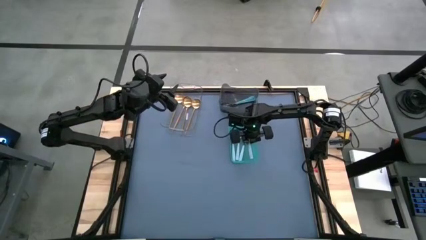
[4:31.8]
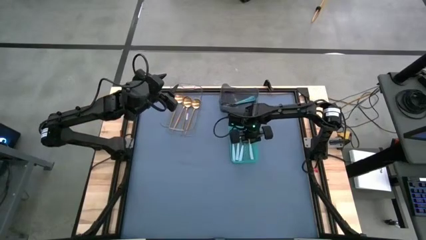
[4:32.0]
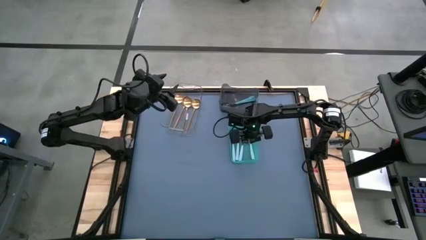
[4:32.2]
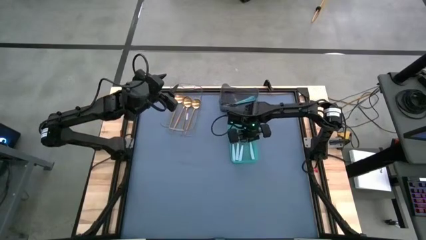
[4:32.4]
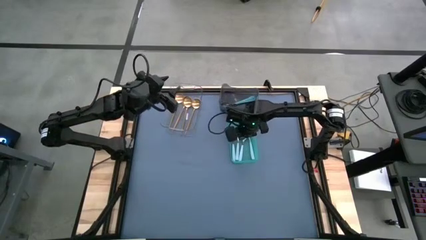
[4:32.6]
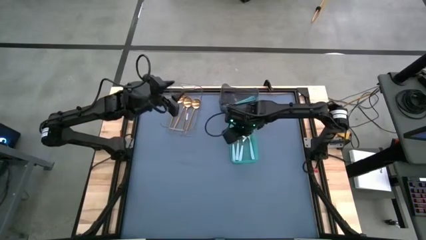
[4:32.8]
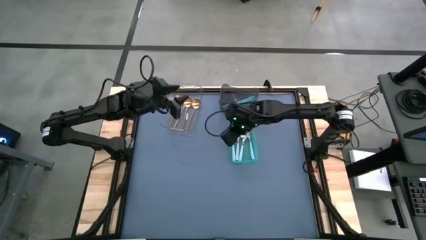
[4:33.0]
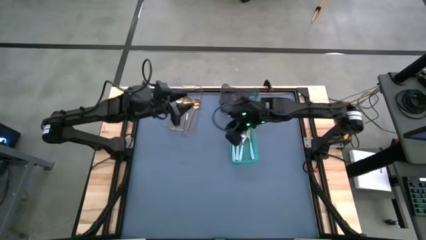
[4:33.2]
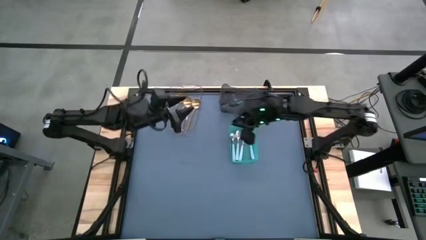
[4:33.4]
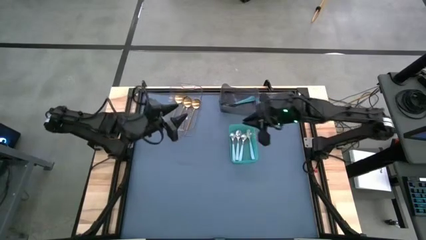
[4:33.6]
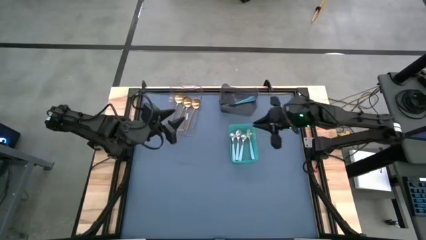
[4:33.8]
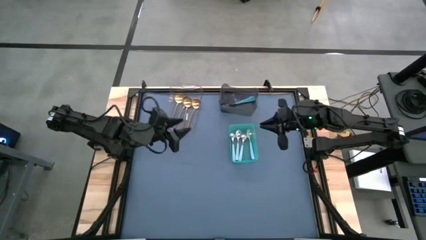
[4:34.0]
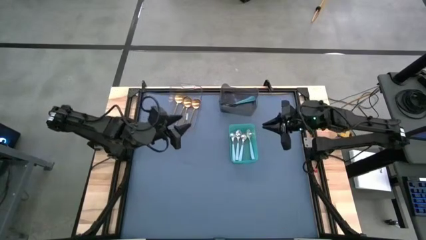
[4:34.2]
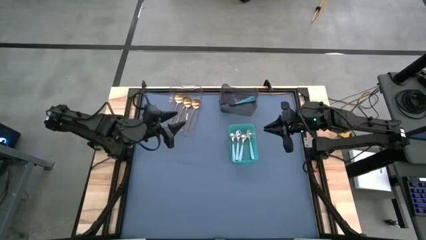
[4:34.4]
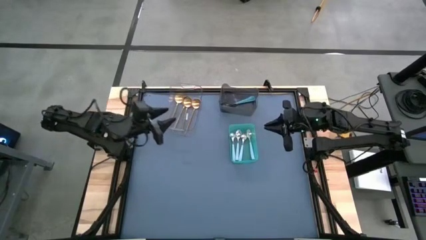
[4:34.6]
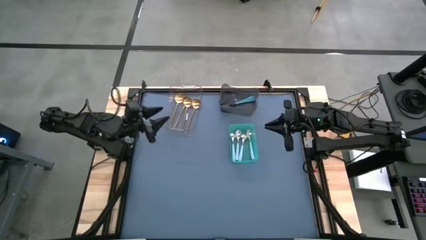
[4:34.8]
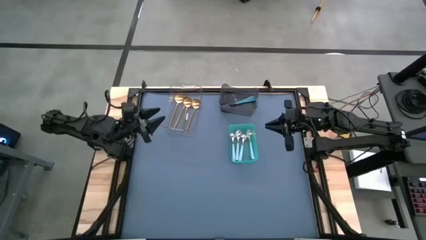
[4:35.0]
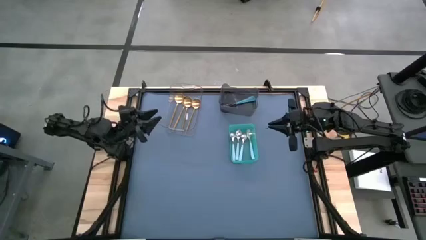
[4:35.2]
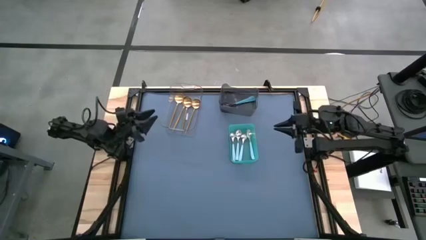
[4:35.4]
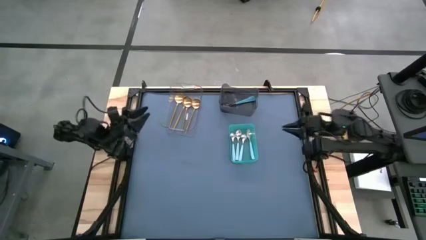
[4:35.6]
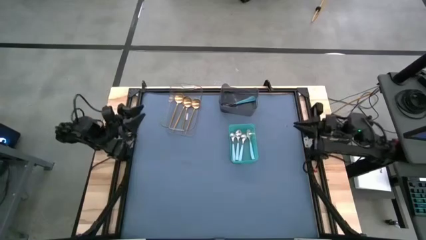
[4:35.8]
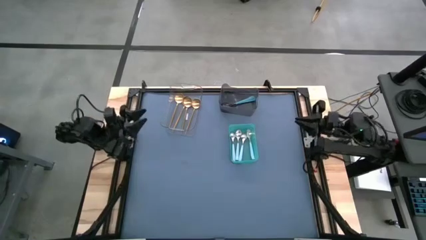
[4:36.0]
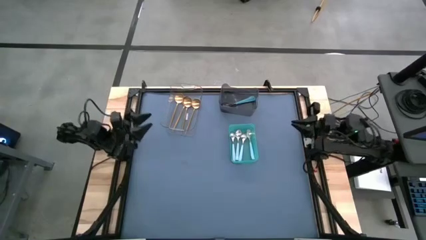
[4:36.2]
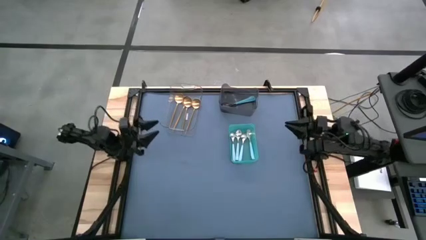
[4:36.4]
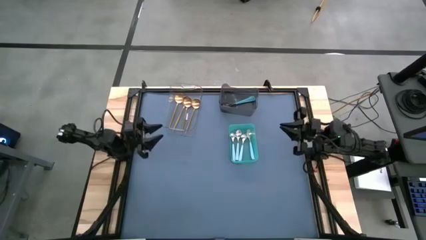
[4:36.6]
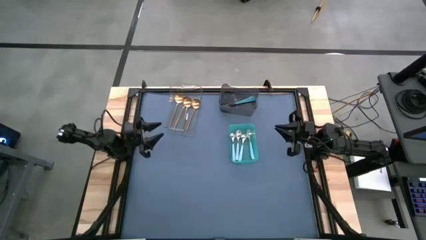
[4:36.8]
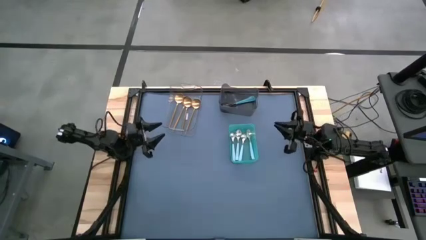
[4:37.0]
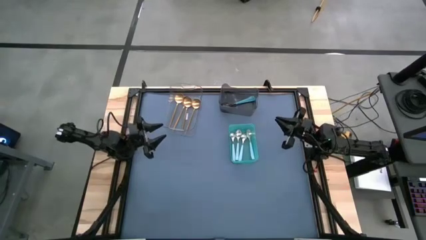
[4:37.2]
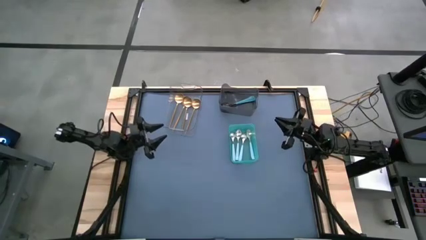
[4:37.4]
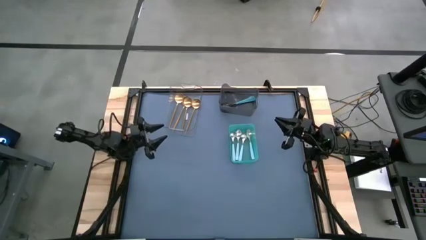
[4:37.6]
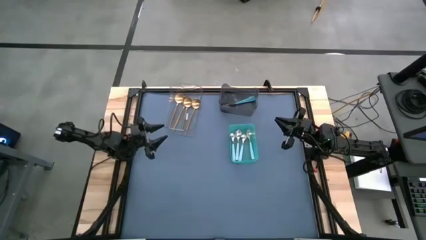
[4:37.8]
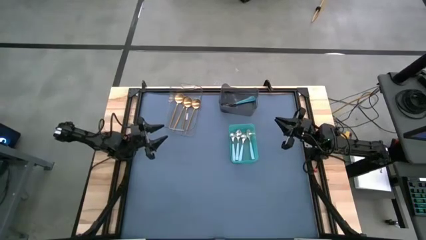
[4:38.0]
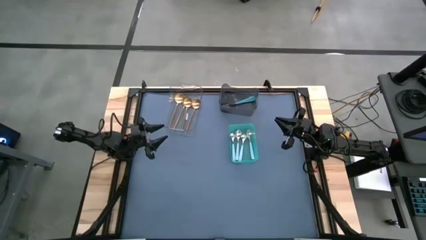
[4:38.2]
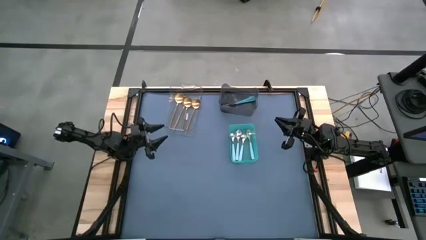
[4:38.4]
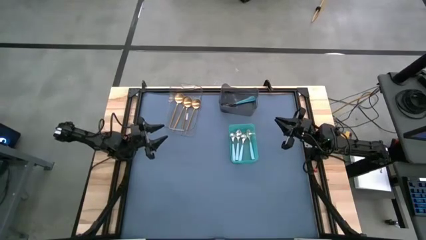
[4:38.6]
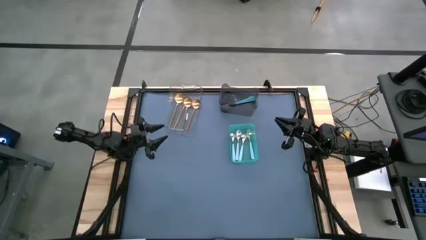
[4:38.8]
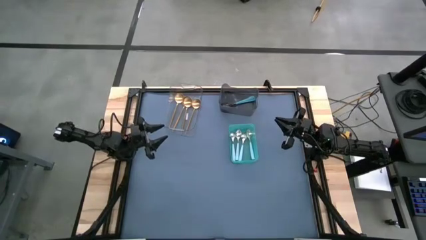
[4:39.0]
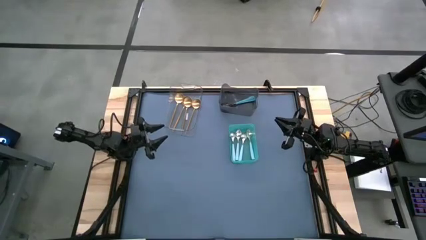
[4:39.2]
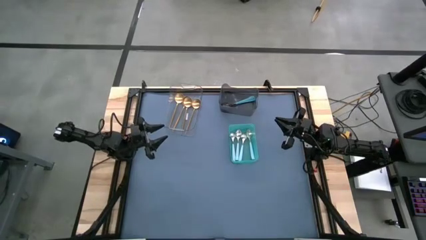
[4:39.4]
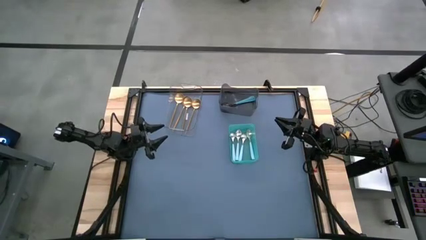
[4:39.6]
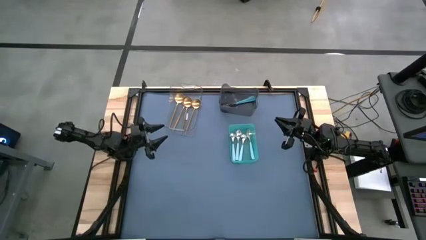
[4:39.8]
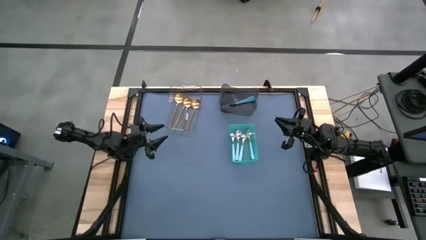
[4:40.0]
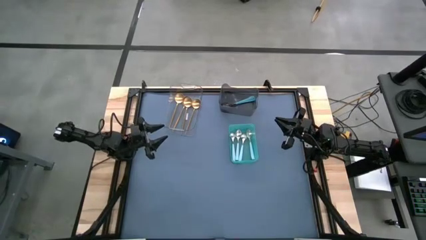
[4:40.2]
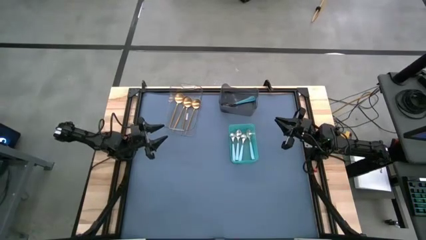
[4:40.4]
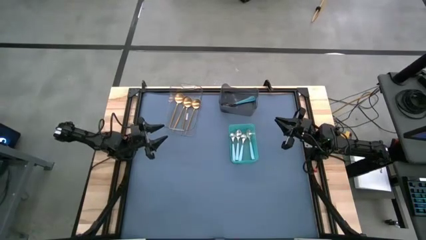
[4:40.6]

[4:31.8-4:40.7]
Task: Sort silverware by color (type)
Return to Home Position
